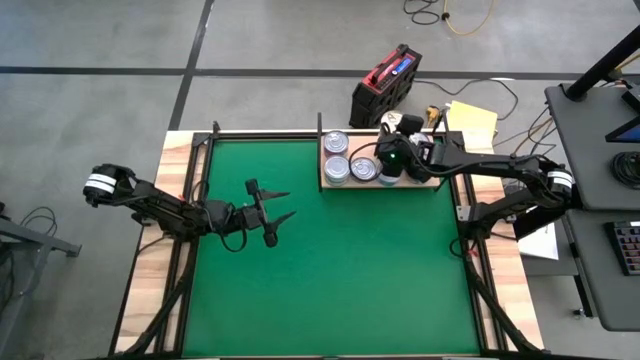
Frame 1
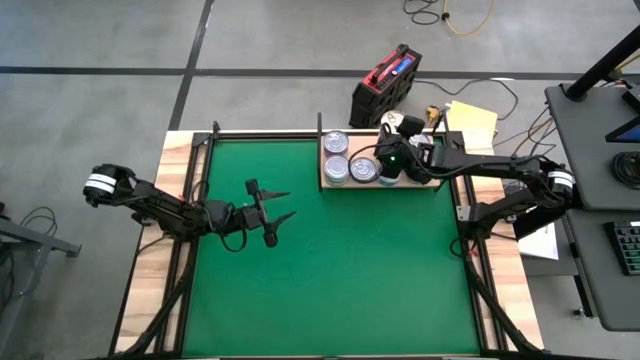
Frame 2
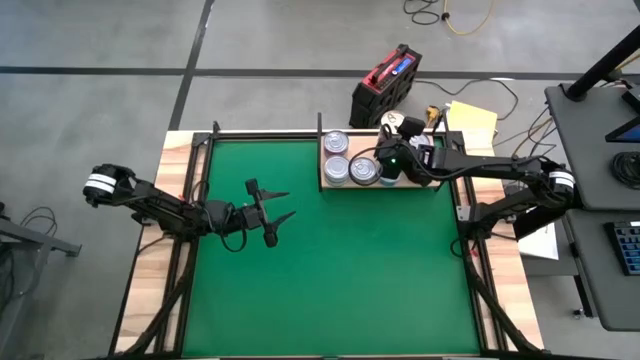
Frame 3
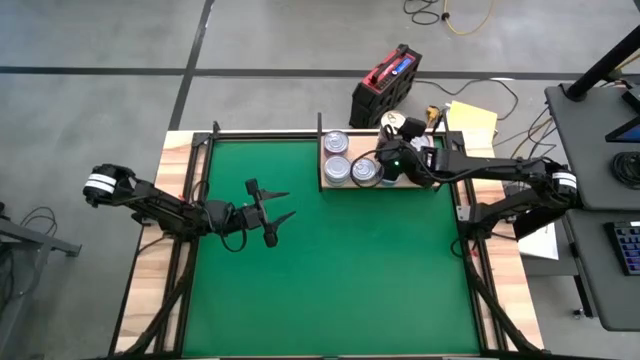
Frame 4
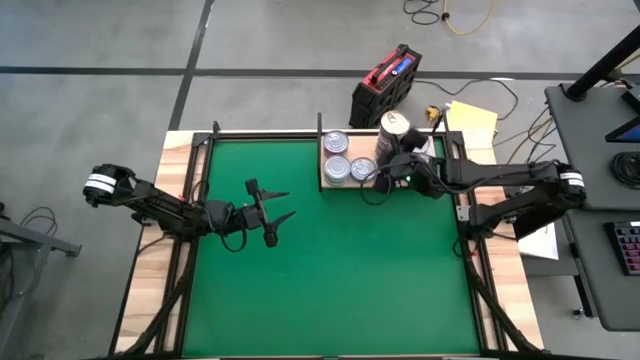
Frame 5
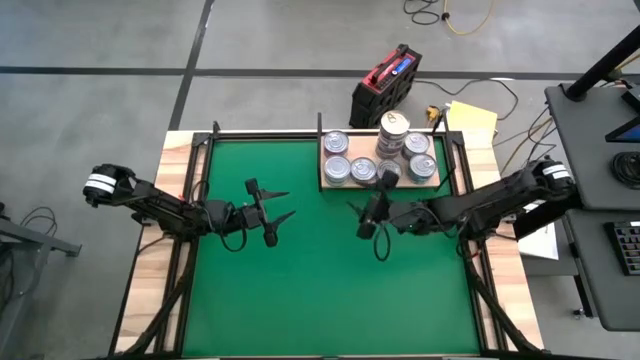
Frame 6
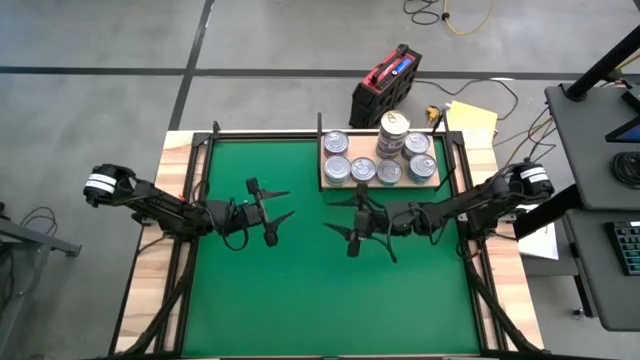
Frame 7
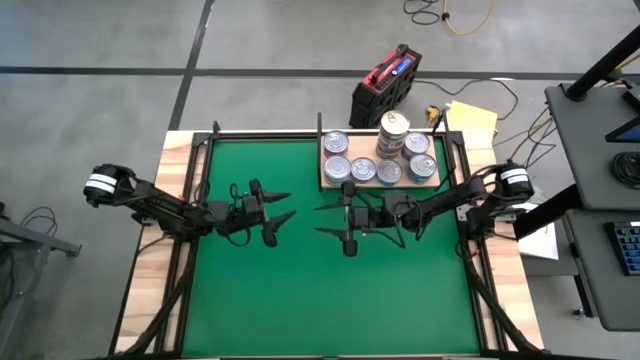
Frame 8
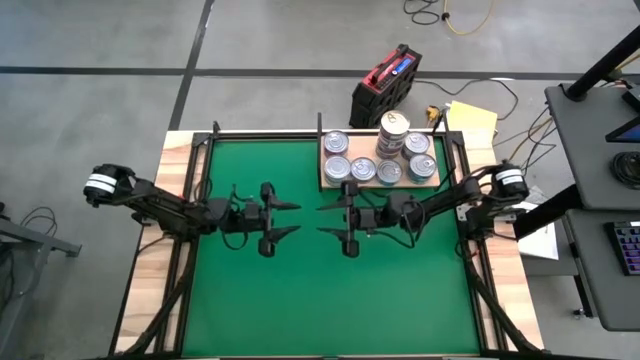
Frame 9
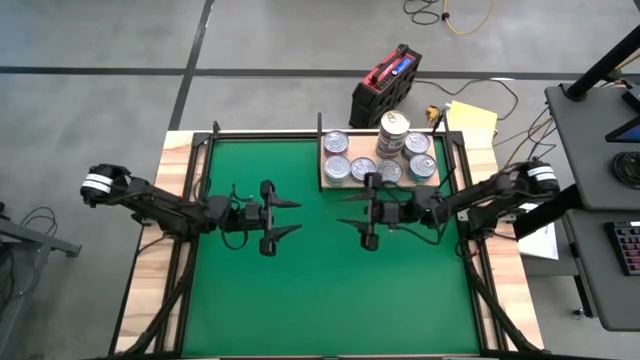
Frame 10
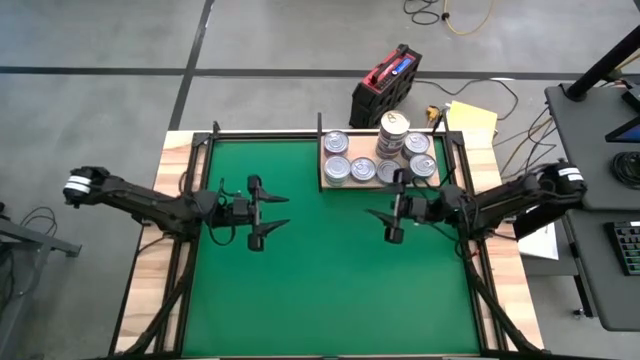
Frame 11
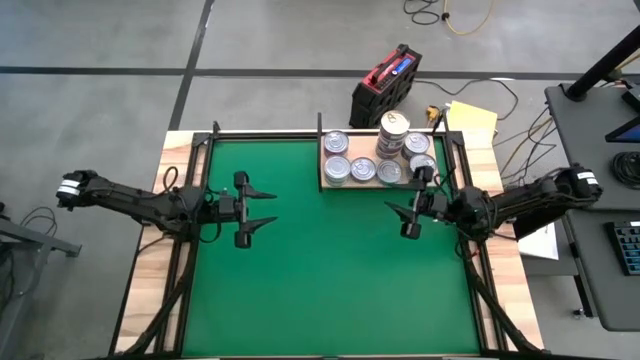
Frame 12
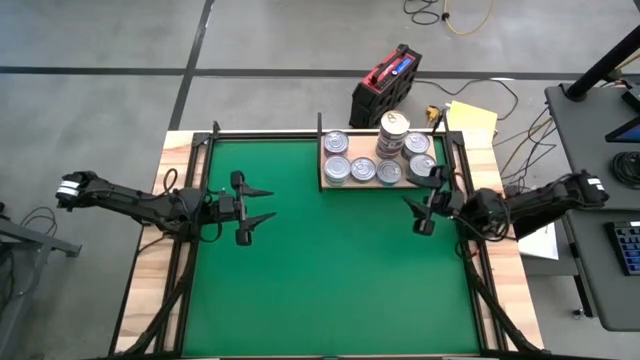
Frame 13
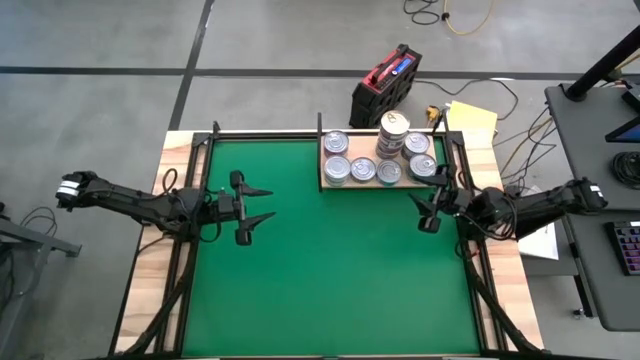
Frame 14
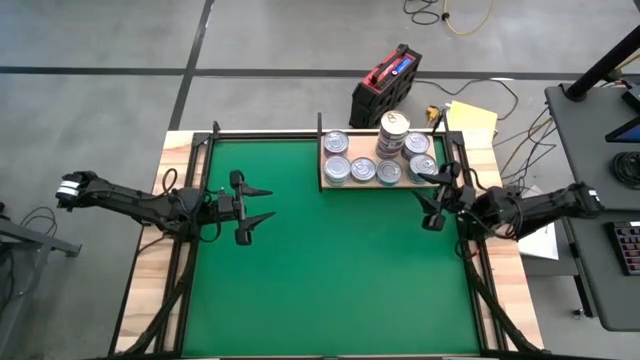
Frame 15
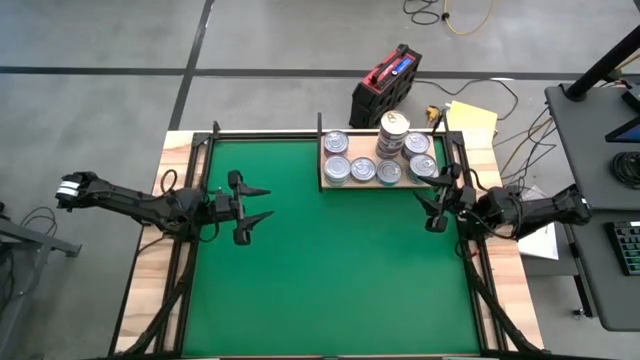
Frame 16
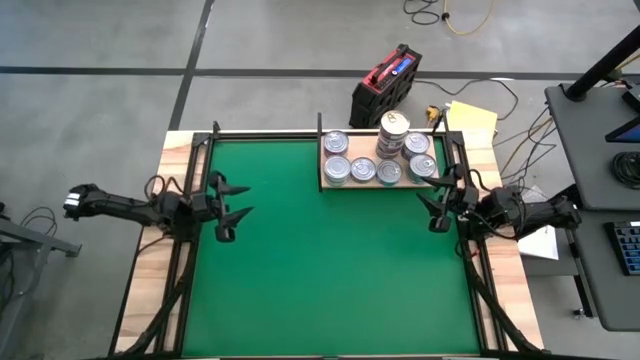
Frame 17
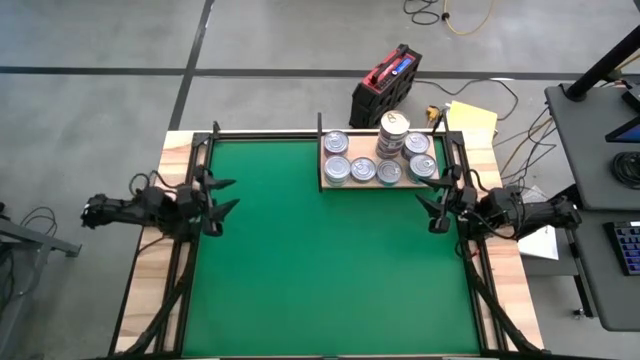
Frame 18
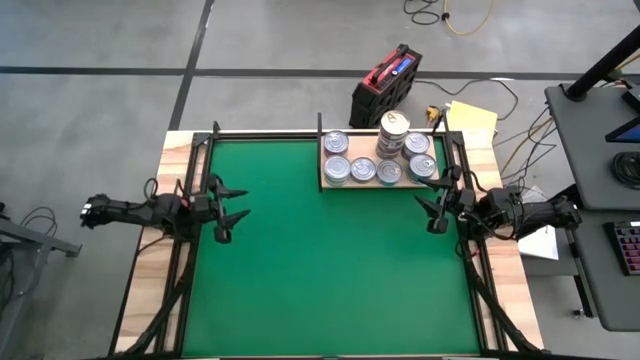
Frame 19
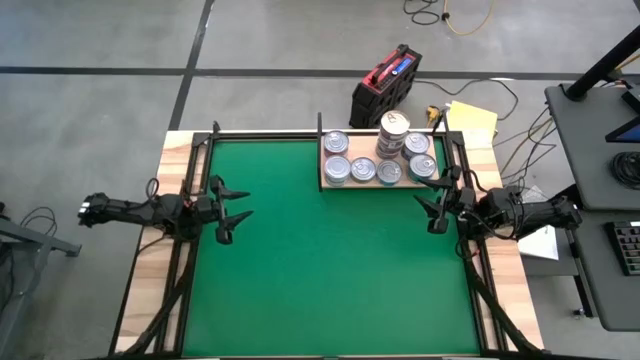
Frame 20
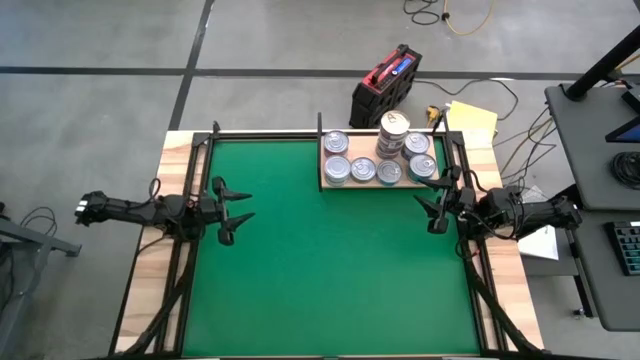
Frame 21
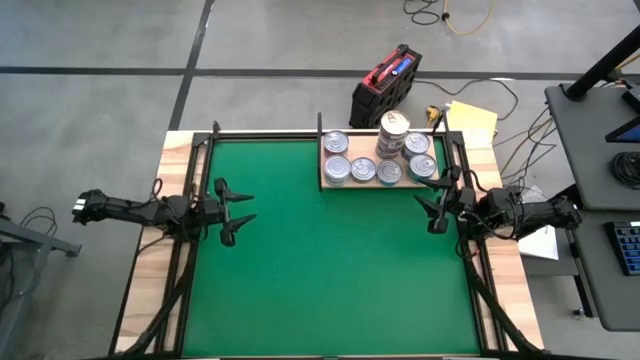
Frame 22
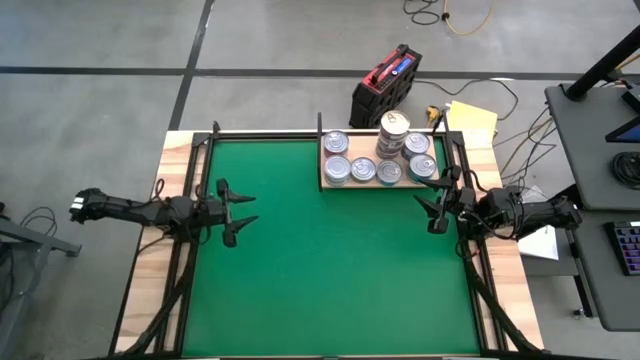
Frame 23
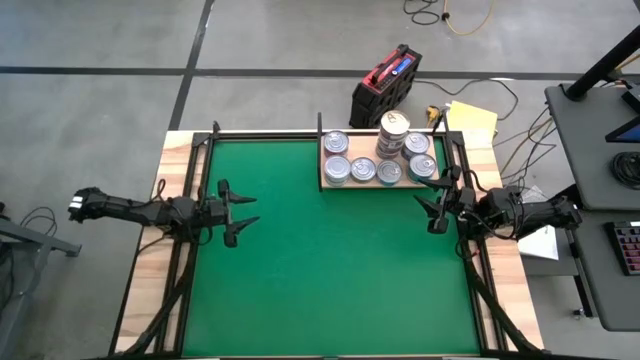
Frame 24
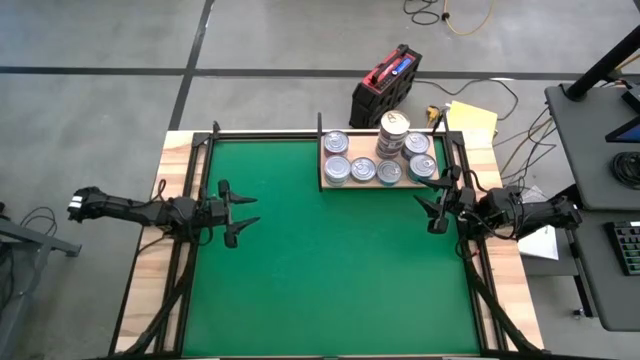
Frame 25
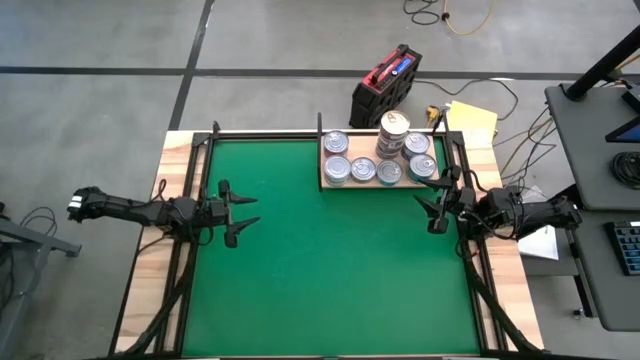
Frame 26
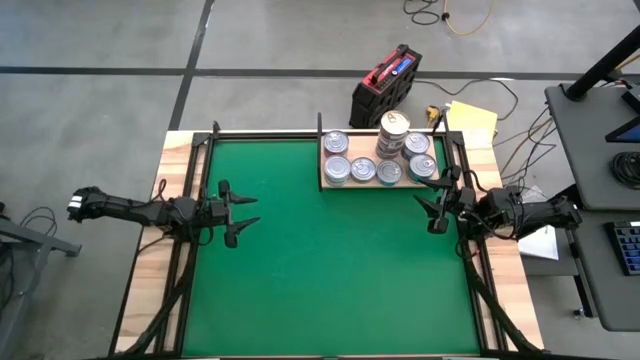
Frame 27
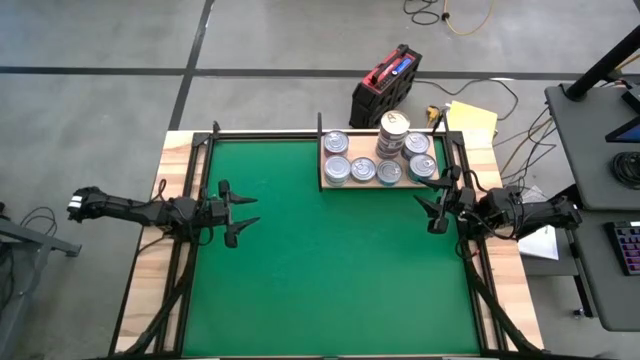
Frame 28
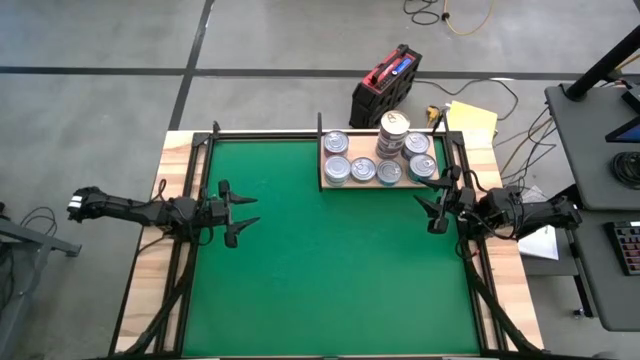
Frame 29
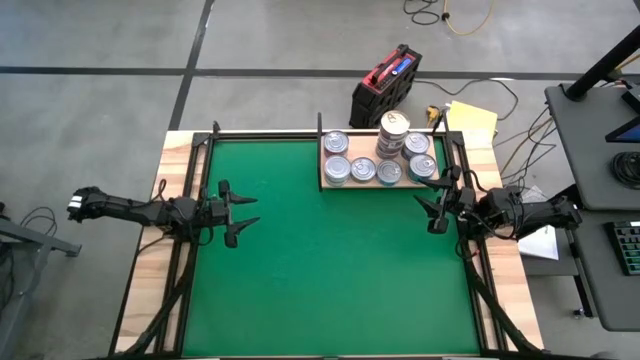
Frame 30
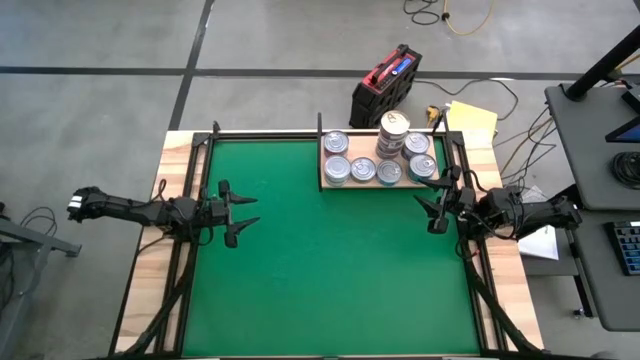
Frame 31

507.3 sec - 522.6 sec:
Task: Stack canned seafood by type on shelf
Return to Home Position

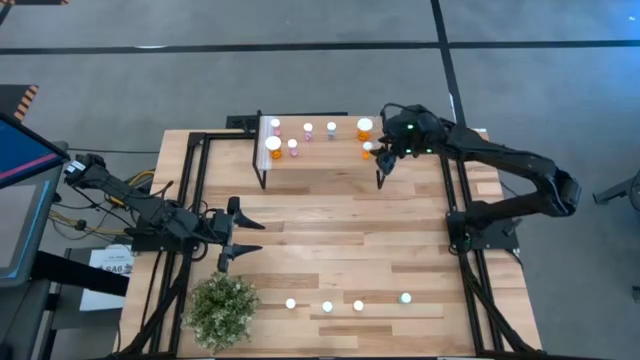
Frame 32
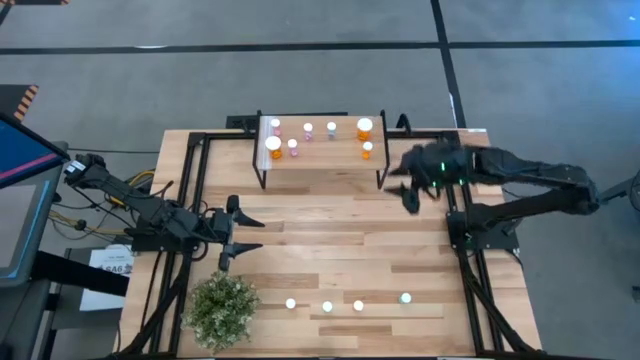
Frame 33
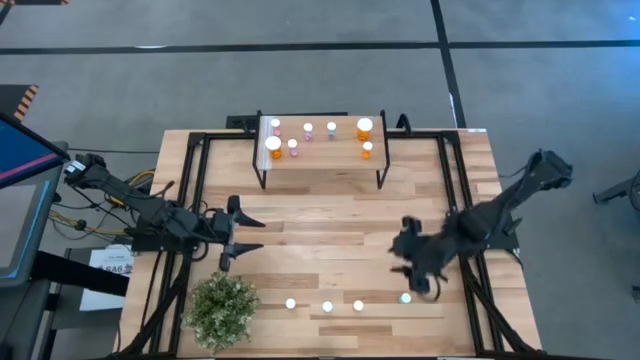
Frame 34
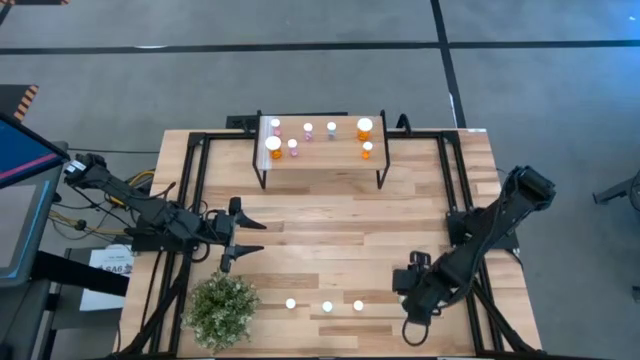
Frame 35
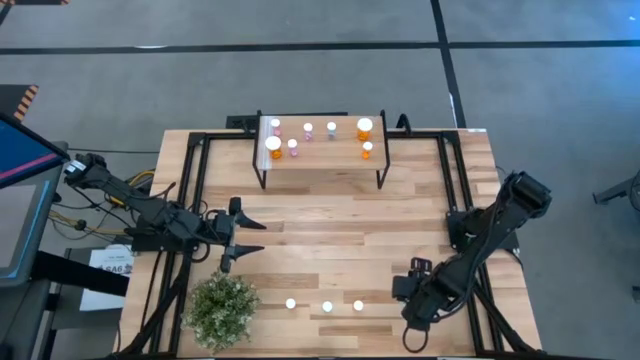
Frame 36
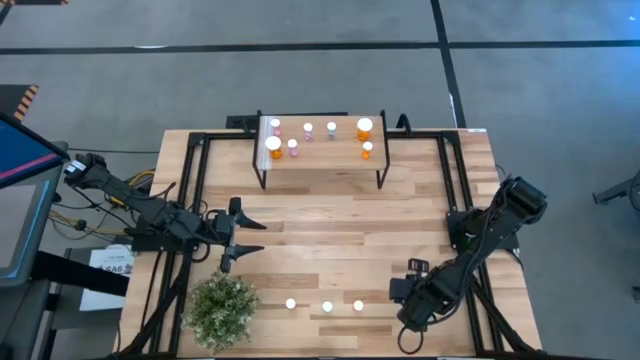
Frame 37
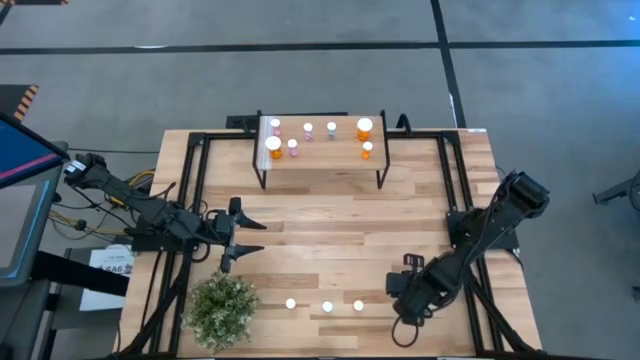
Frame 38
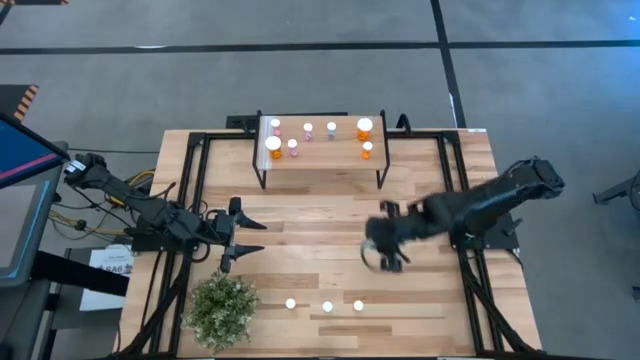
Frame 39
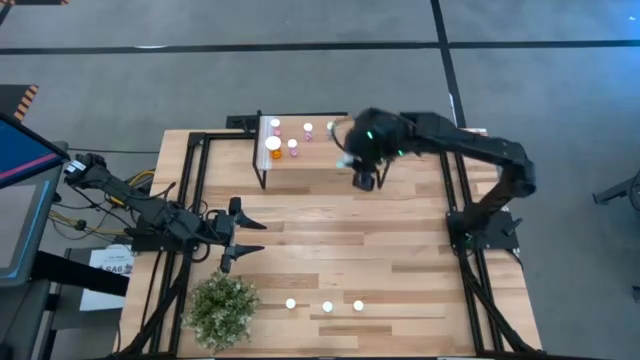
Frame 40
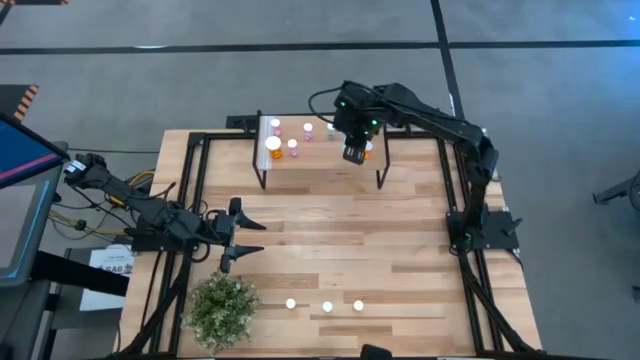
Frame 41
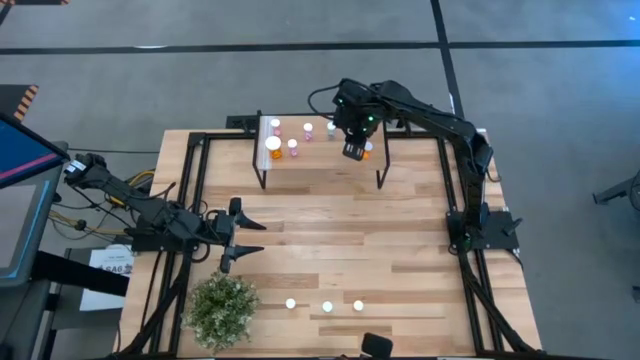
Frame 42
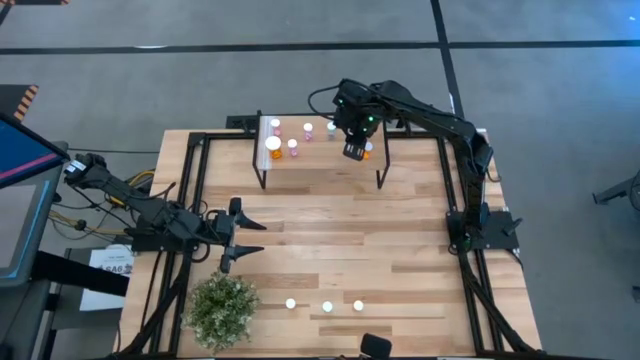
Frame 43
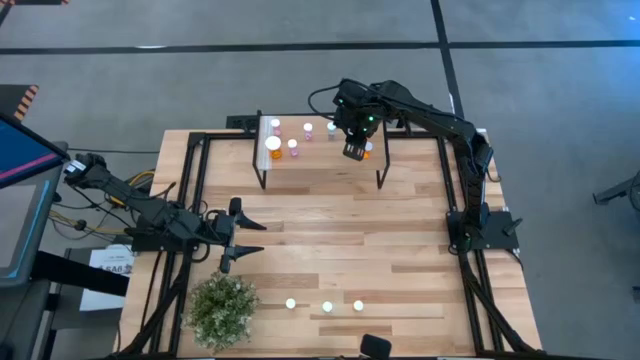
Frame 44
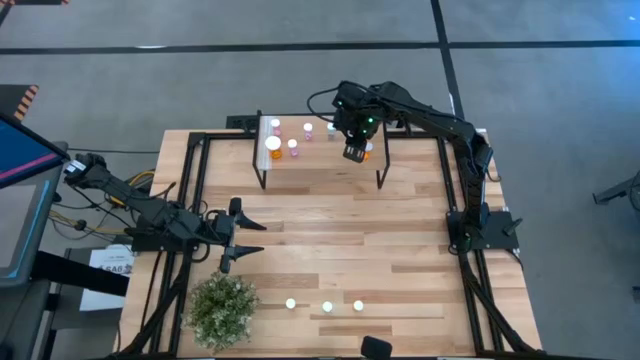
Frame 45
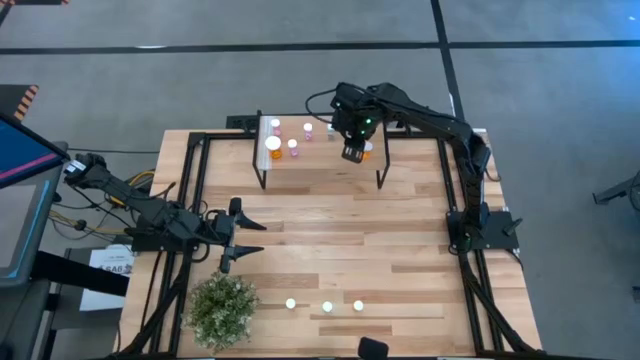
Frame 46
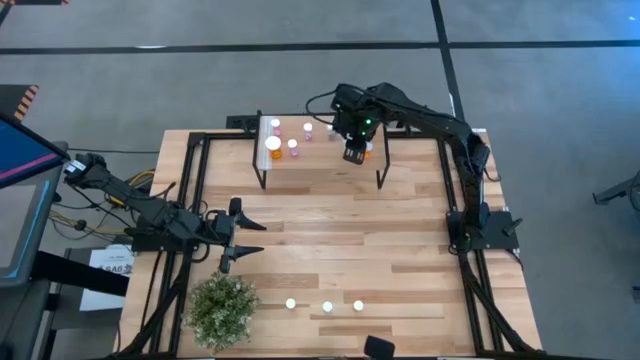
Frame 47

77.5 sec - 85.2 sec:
Task: Pick and place medicine bottles onto shelf by color
Put the small green pill bottle on the shelf
